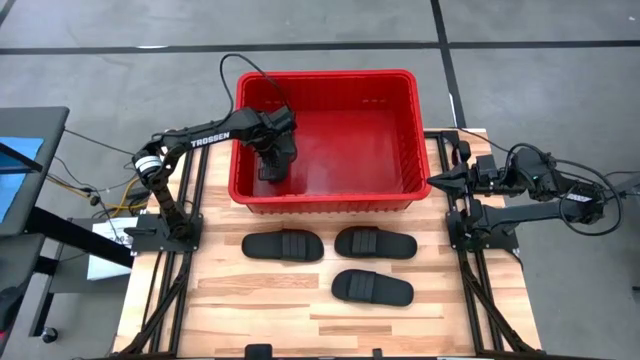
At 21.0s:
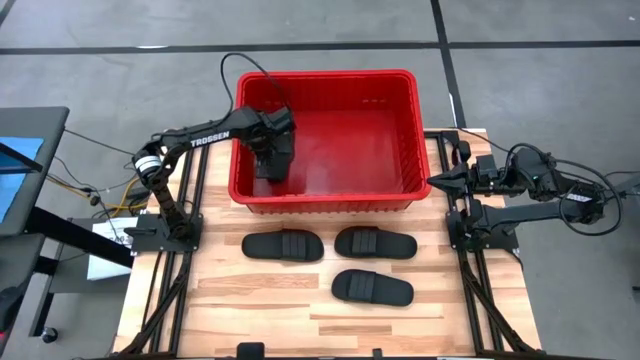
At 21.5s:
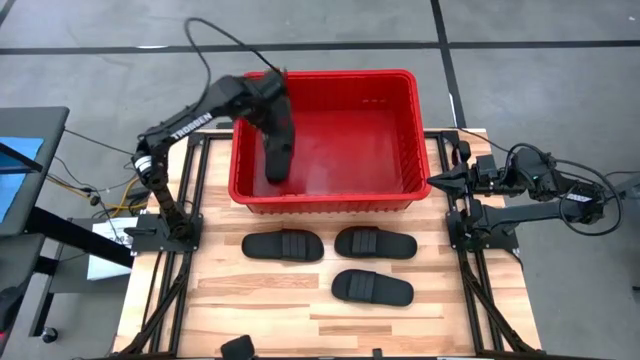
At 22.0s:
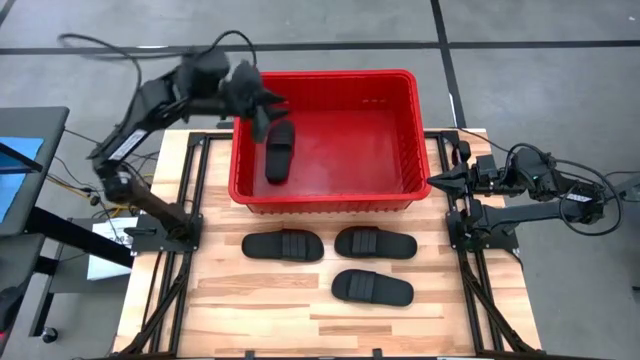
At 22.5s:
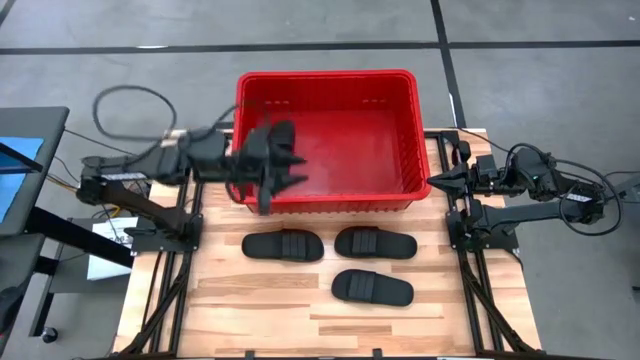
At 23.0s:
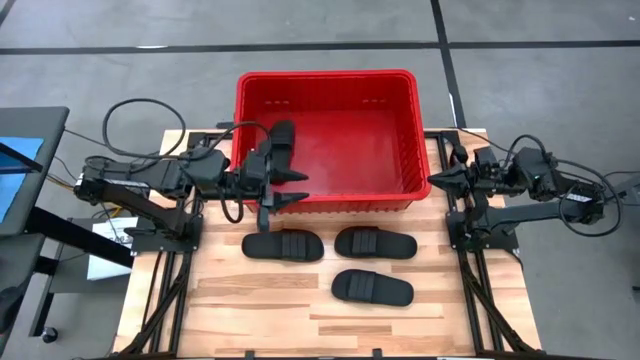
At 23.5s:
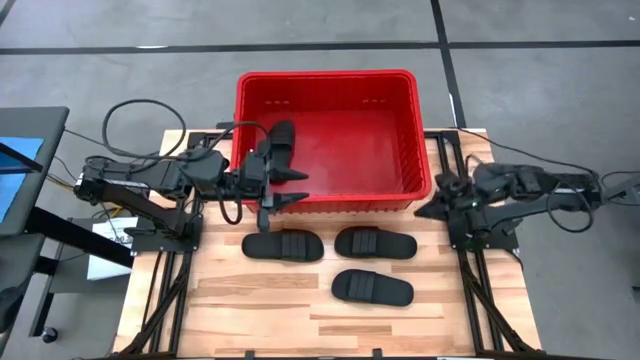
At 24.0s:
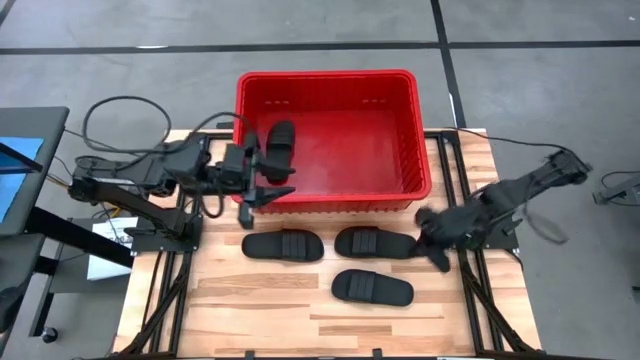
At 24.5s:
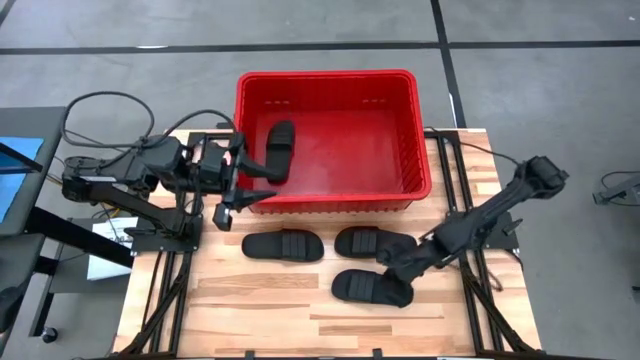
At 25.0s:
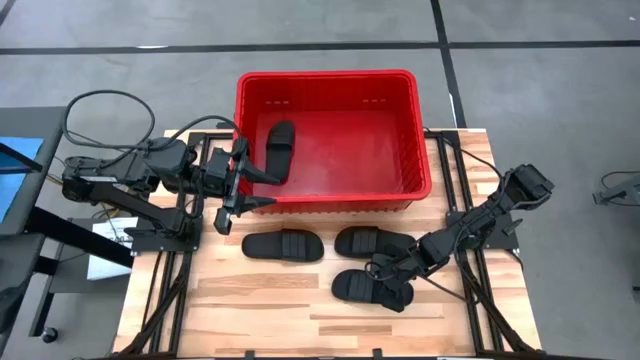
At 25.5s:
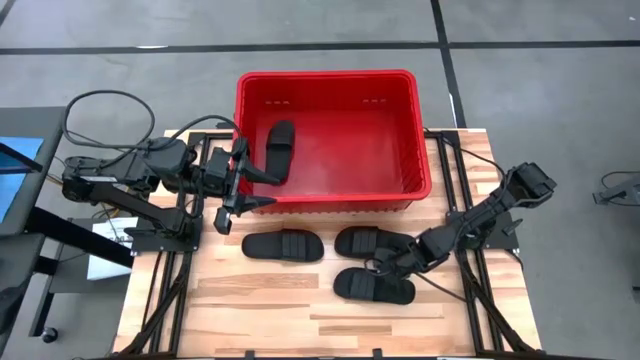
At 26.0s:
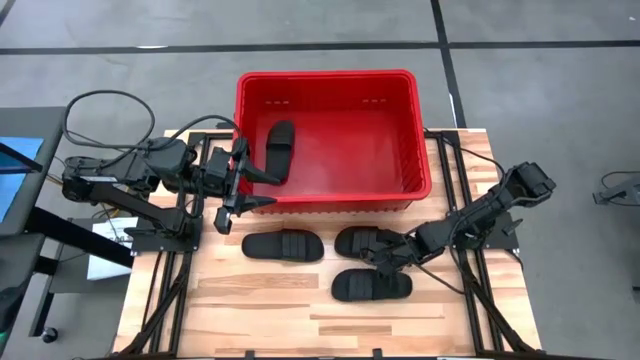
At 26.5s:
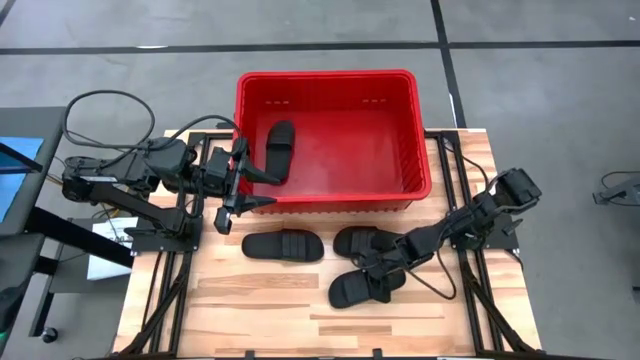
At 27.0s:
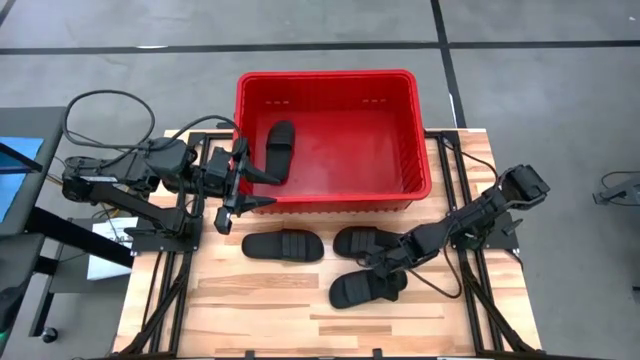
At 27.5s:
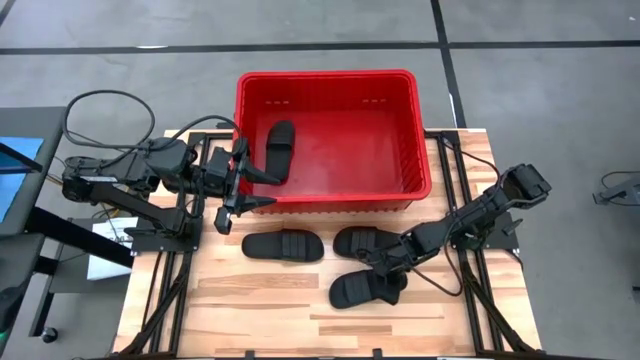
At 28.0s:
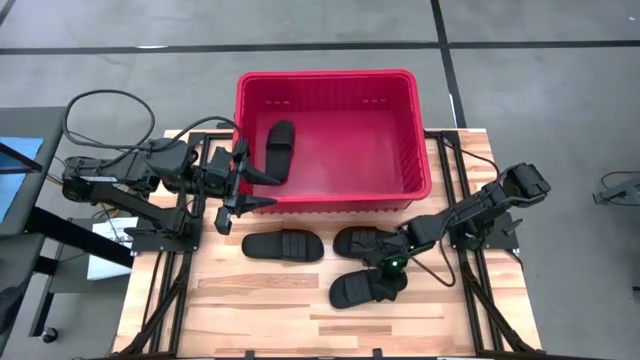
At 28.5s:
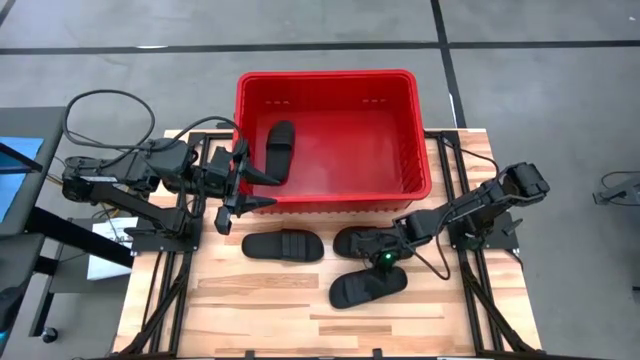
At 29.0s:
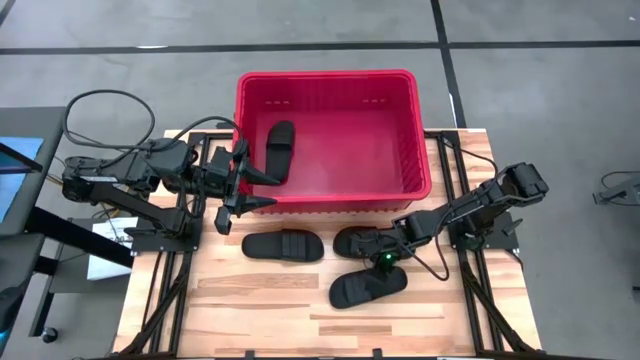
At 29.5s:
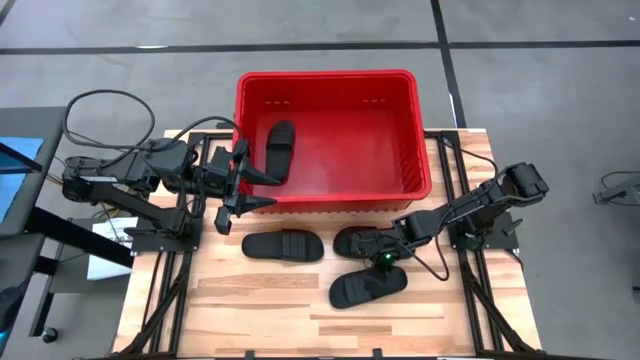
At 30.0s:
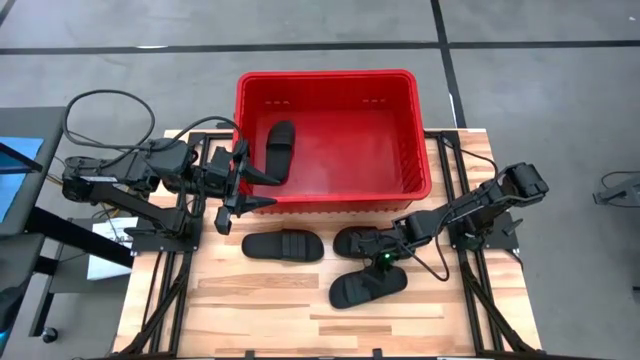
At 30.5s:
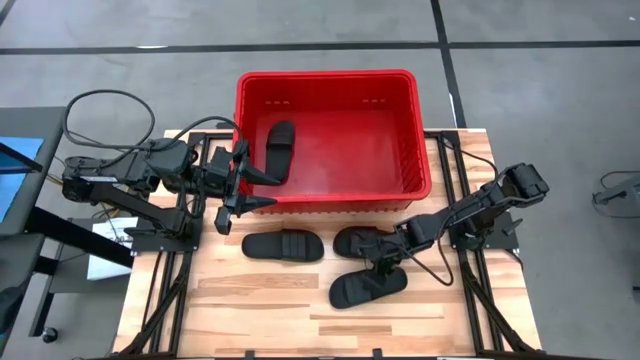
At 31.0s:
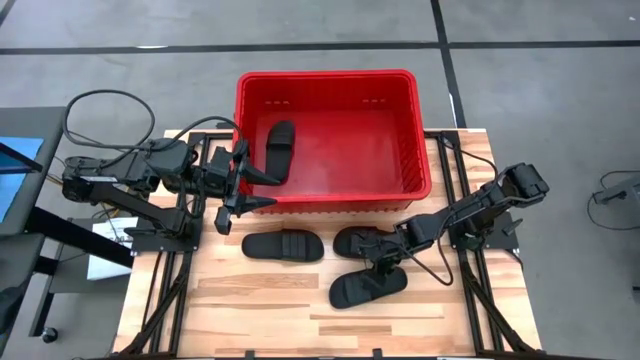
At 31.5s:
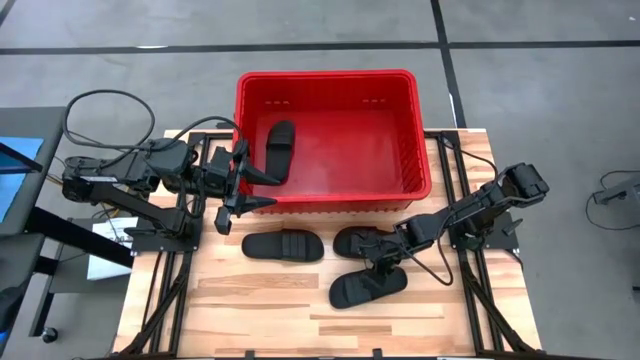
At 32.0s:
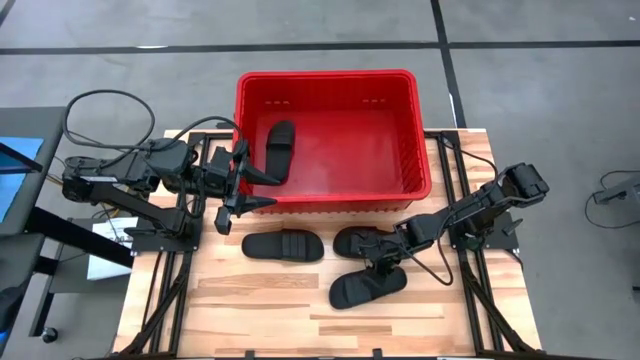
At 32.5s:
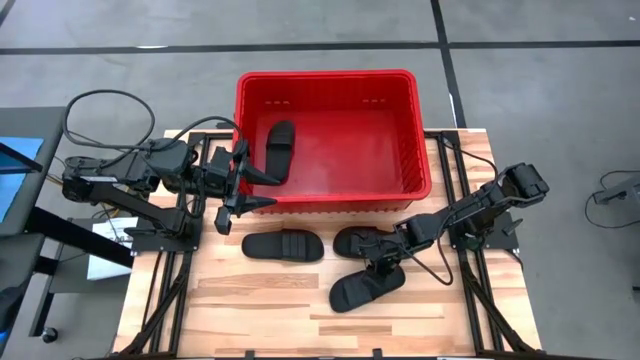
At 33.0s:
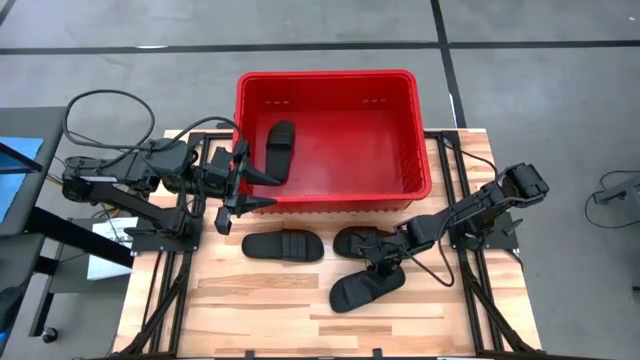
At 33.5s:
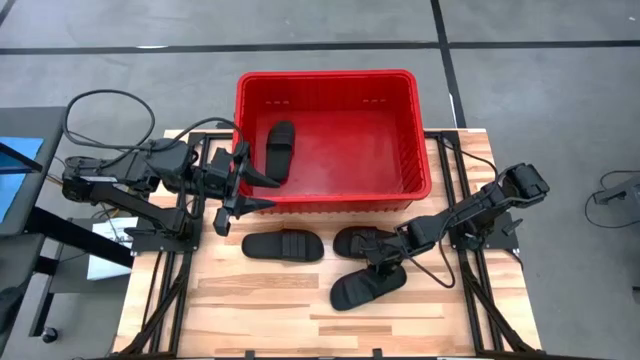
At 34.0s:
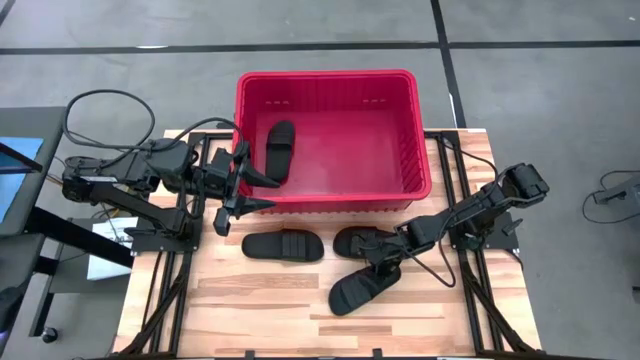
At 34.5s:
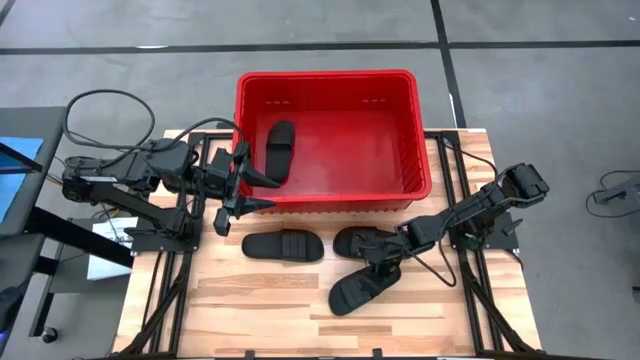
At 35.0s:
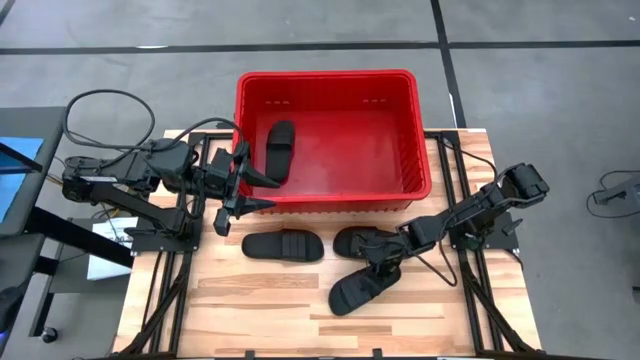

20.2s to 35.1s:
Task: Pick and place slides into bin
Put the black slide into the red bin

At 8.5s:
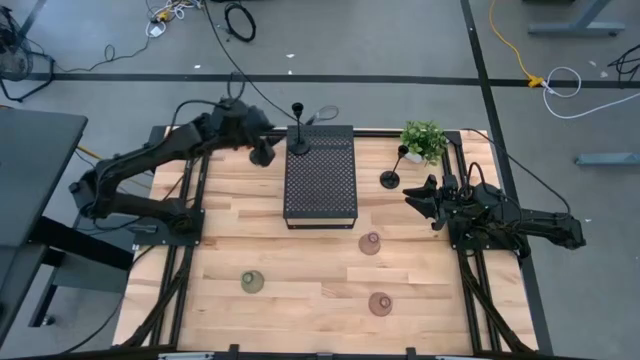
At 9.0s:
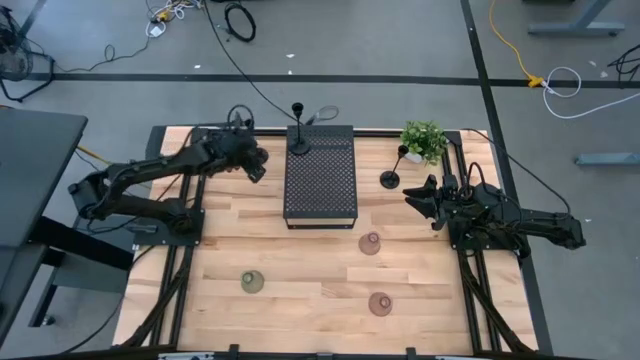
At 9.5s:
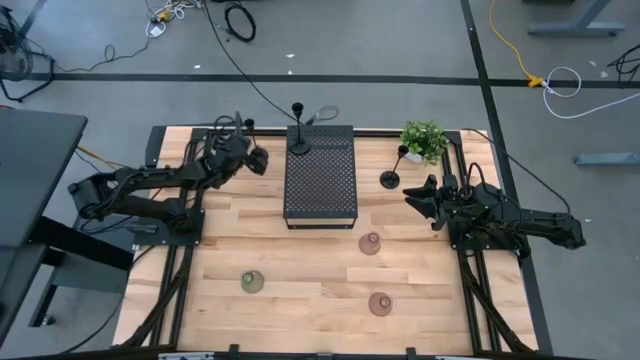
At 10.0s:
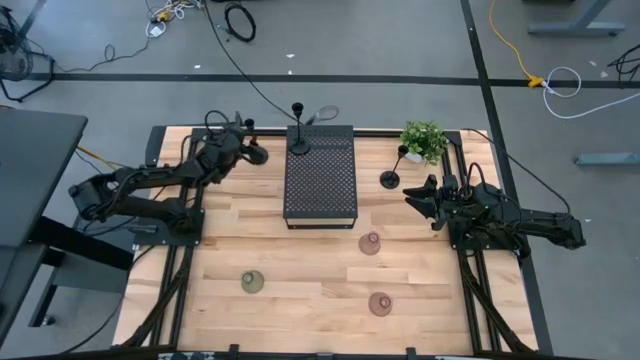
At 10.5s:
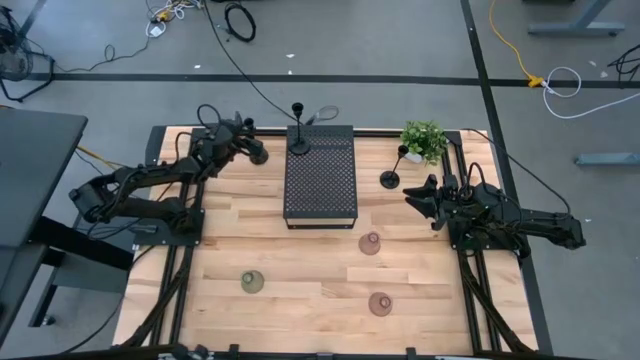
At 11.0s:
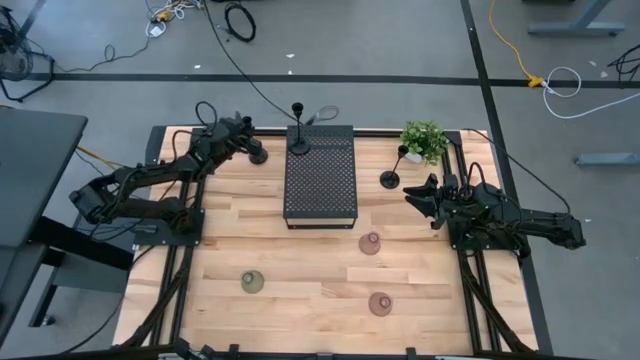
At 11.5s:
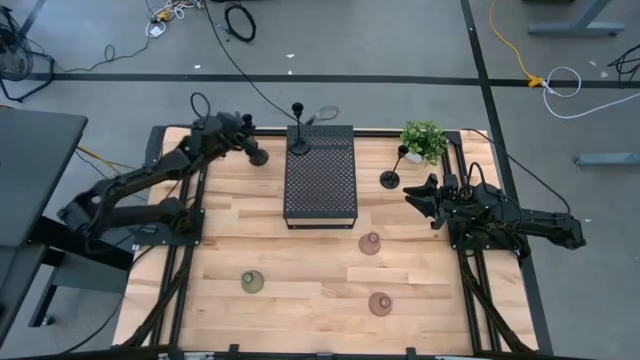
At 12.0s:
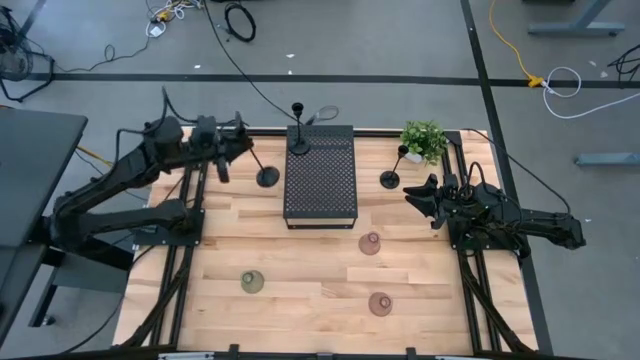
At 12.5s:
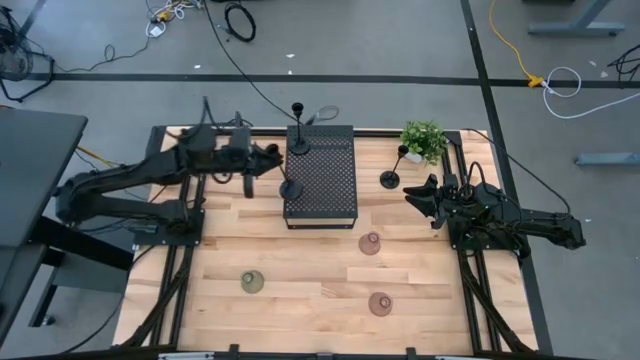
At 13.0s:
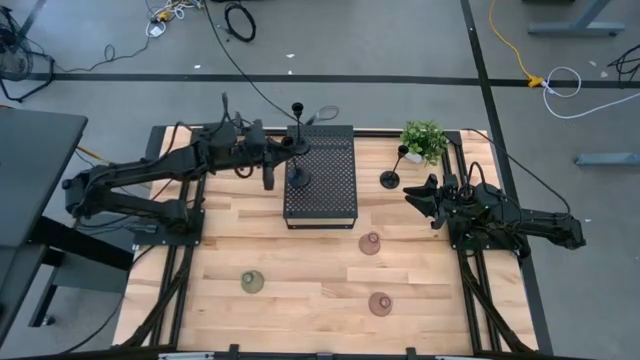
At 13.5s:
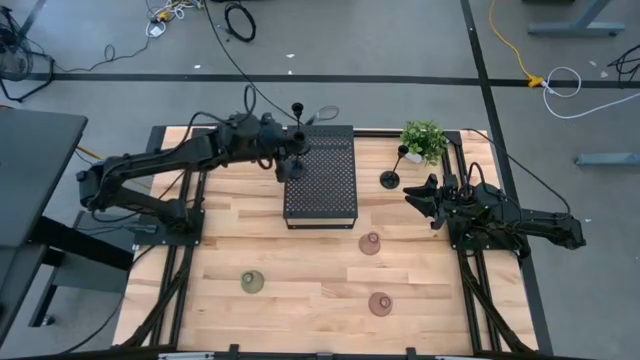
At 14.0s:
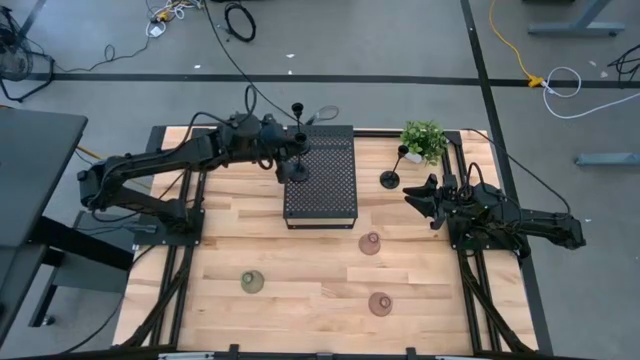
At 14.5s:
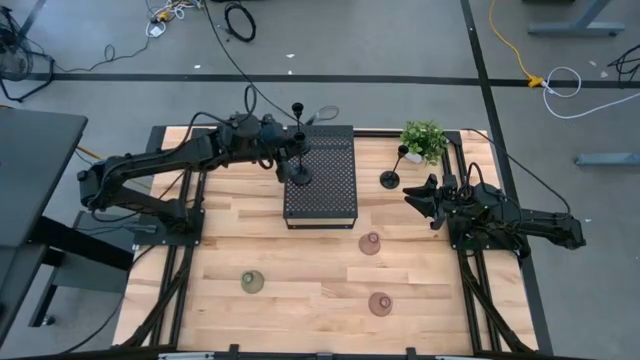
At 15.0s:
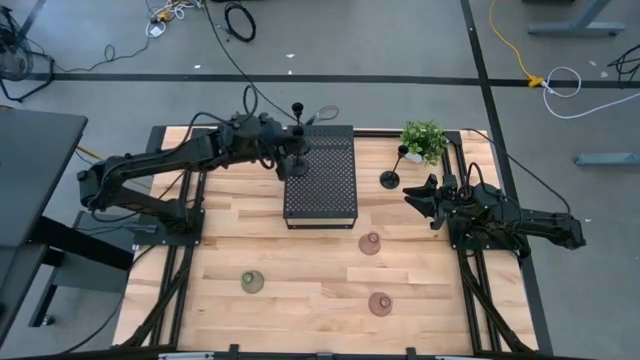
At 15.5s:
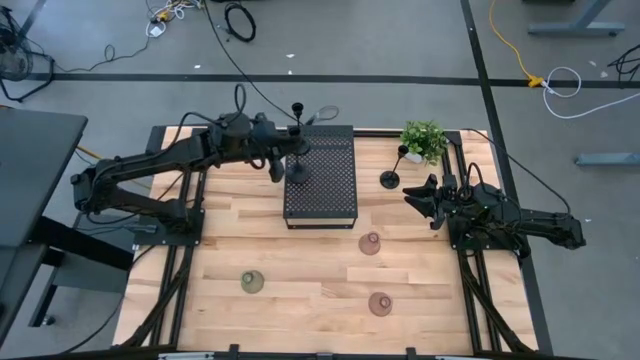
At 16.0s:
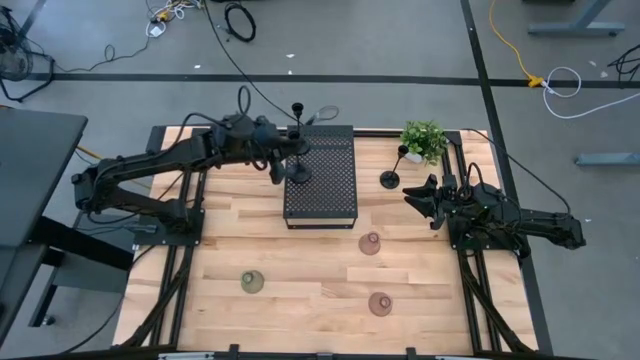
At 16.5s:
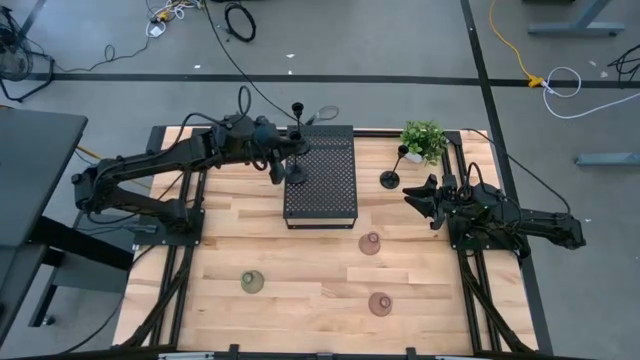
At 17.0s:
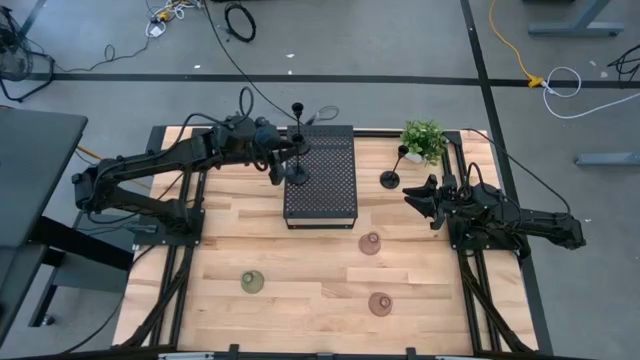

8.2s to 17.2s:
Task: Pick & Place candle stick holders
Put the left black candle holder on the shelf
